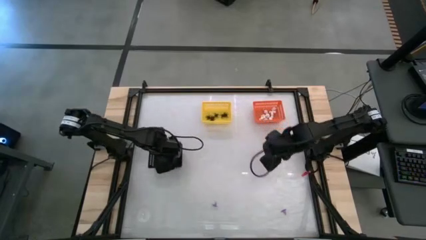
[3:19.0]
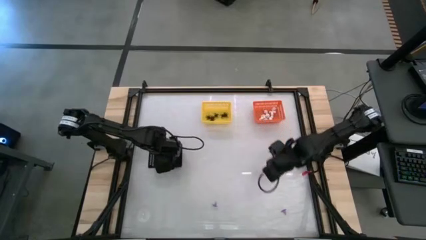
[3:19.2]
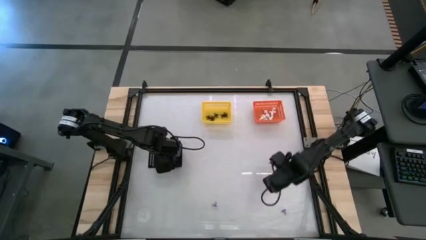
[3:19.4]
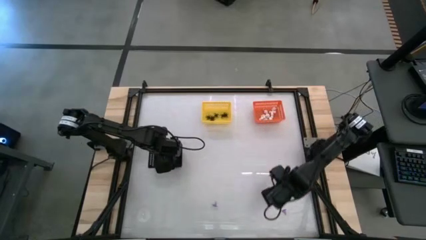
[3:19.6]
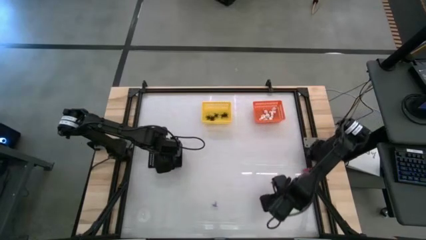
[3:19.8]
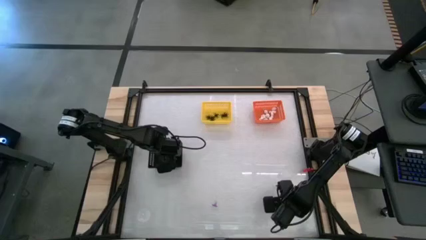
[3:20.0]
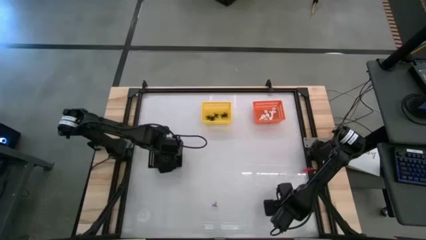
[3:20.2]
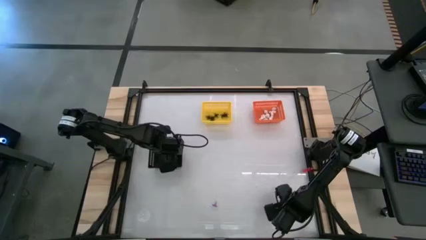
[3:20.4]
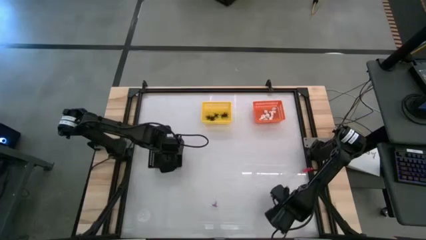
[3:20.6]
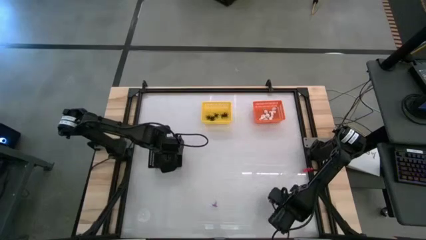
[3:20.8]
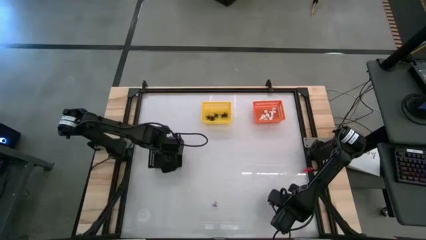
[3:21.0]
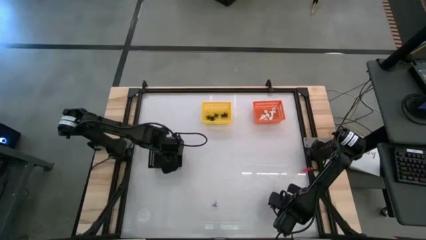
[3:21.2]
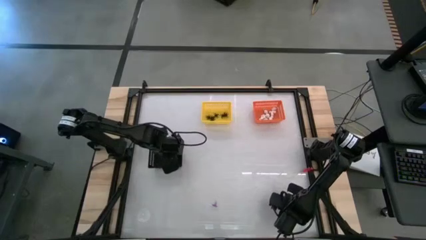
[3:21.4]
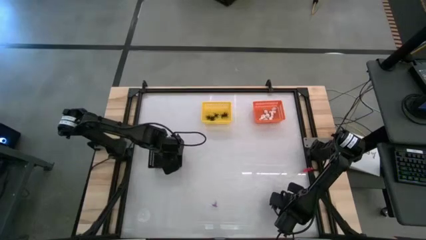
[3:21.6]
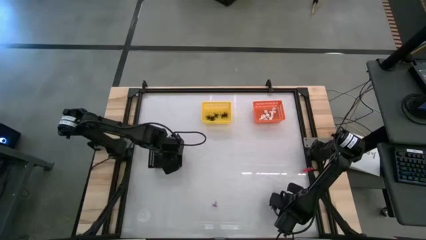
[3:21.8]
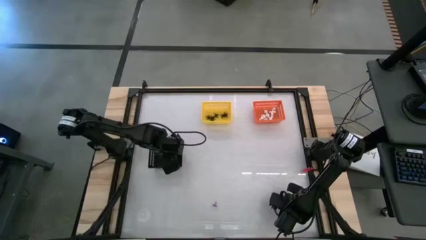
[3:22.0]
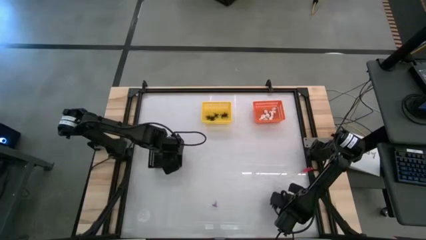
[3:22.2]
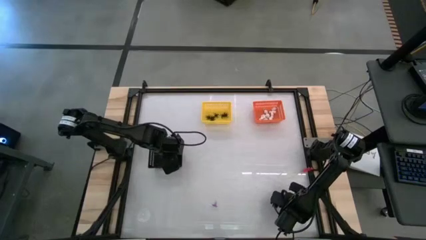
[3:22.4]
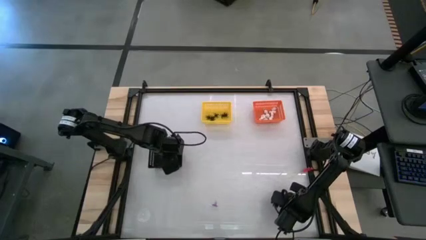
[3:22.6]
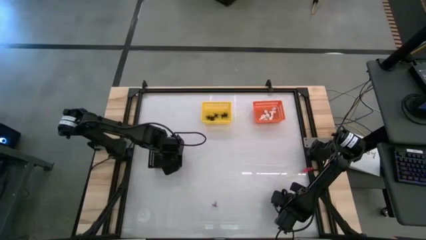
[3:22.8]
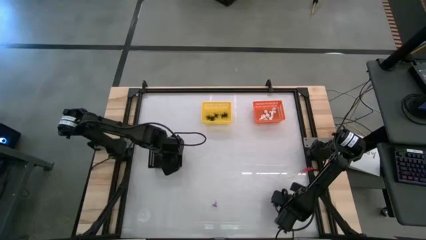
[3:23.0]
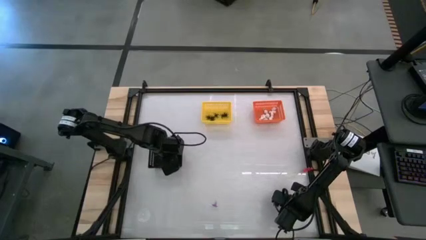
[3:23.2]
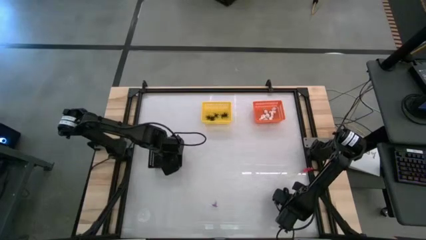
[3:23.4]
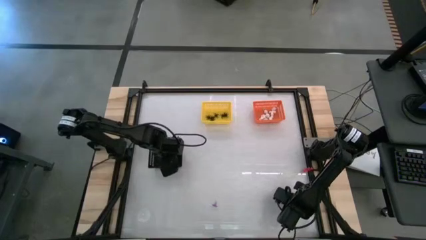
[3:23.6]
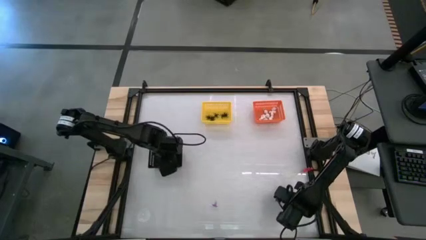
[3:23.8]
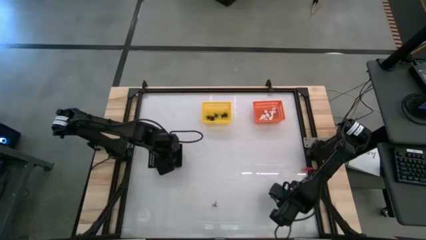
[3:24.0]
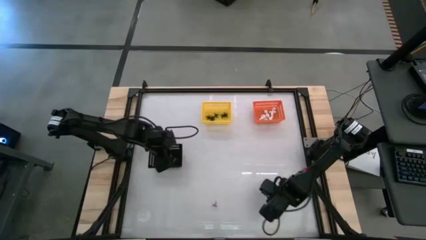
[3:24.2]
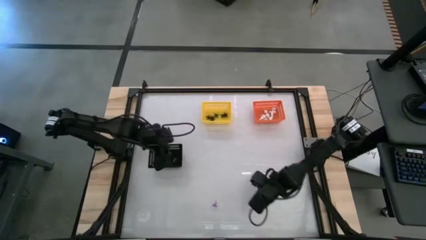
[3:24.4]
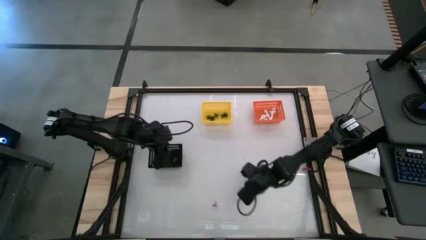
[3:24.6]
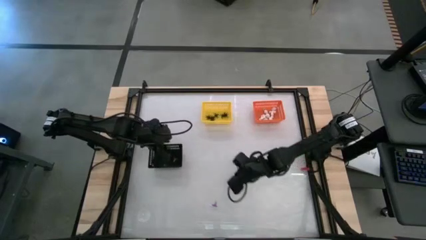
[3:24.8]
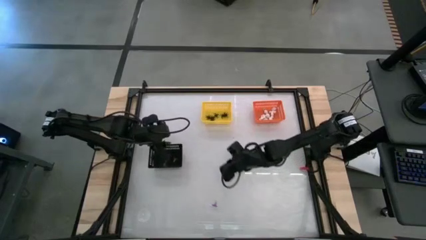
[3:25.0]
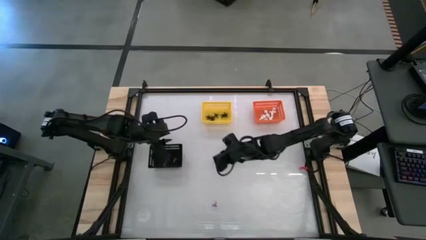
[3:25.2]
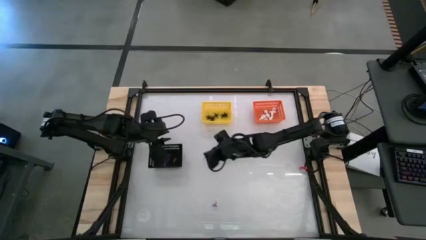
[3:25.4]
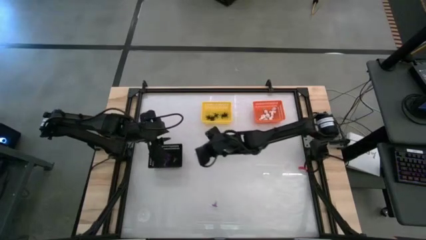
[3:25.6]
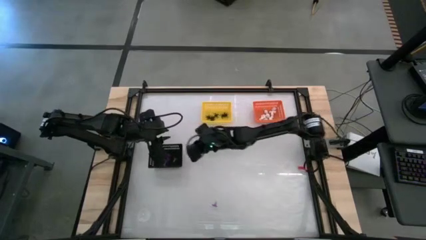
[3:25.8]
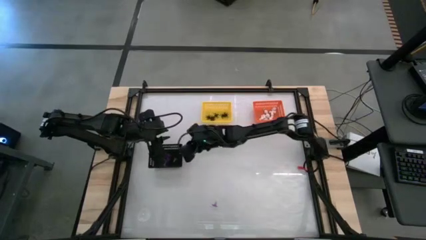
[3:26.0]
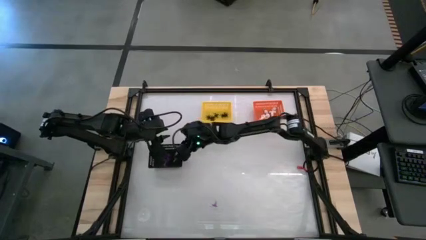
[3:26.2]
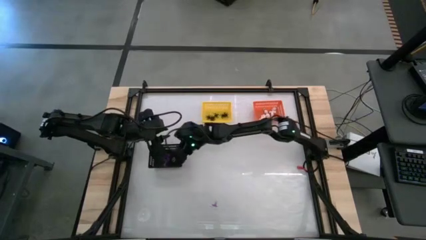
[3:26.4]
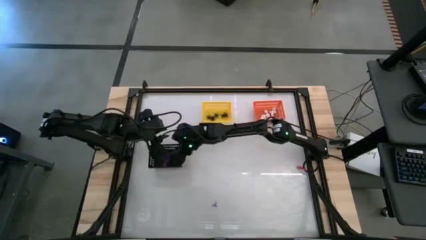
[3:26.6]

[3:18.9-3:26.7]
Task: Sort Halloween decoration
Put the purple hat toy into the black basket

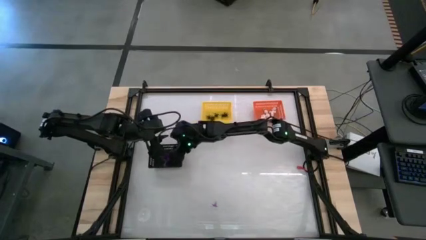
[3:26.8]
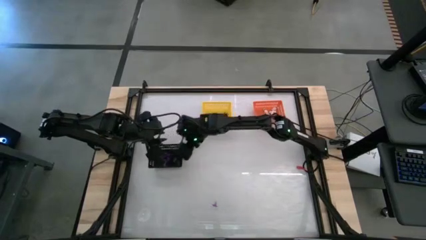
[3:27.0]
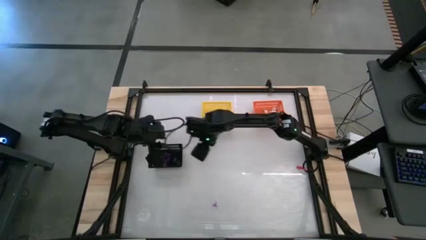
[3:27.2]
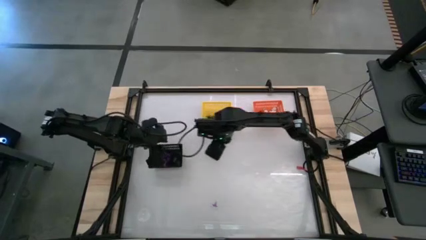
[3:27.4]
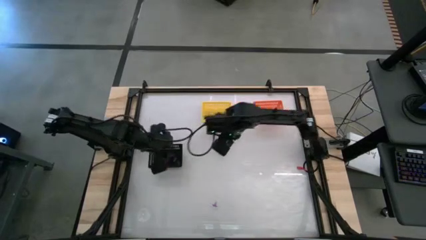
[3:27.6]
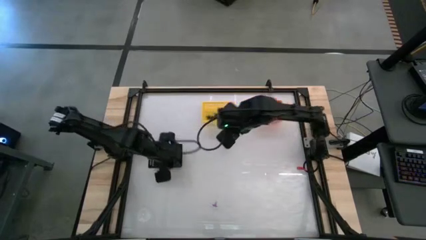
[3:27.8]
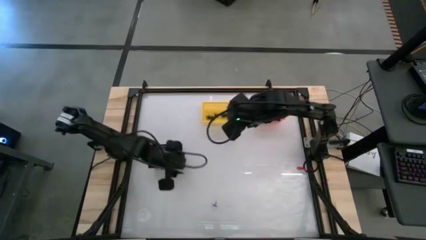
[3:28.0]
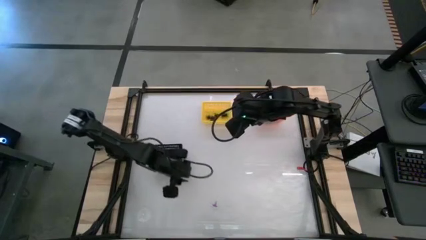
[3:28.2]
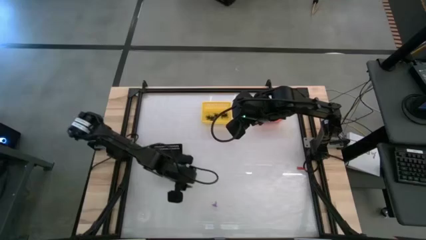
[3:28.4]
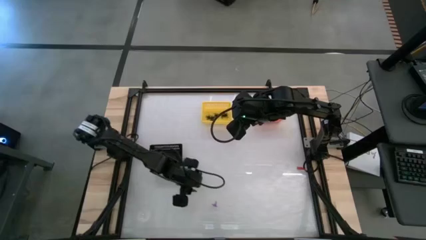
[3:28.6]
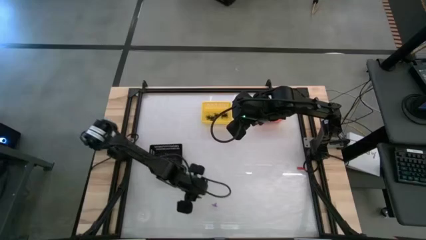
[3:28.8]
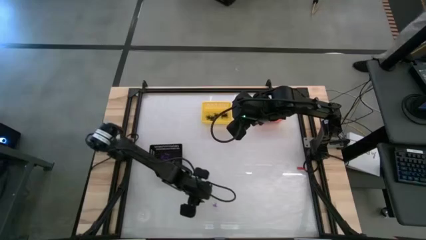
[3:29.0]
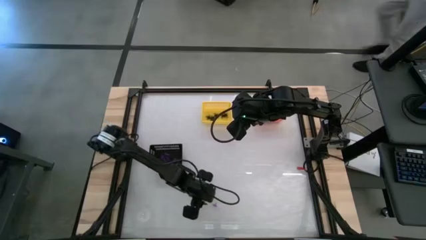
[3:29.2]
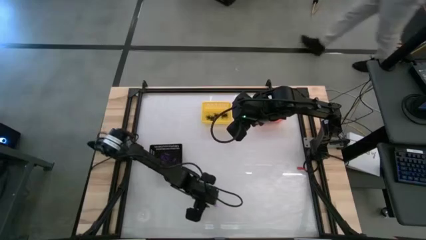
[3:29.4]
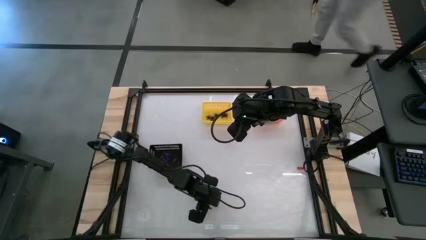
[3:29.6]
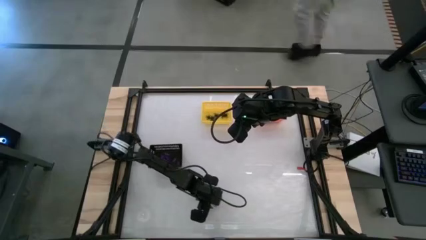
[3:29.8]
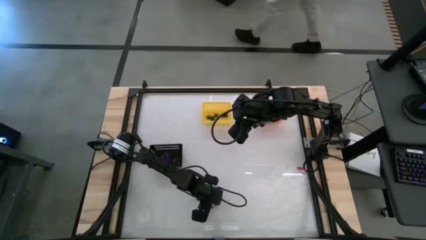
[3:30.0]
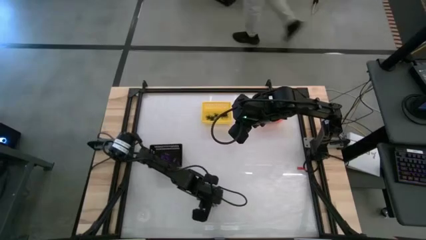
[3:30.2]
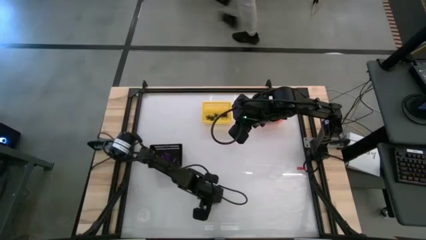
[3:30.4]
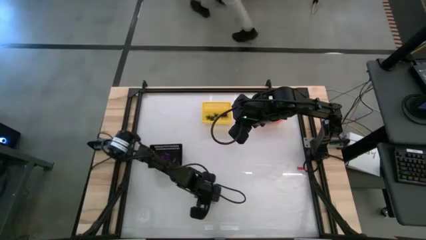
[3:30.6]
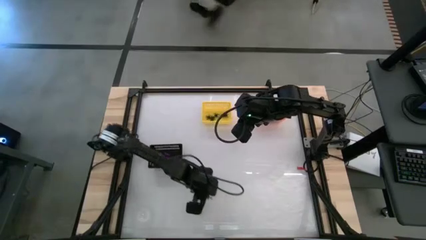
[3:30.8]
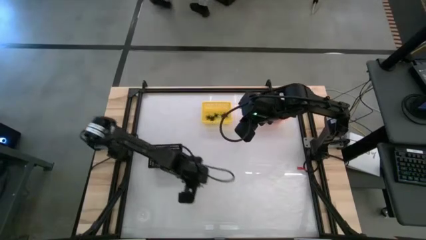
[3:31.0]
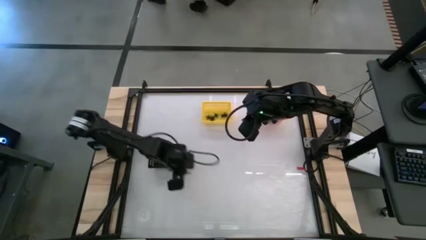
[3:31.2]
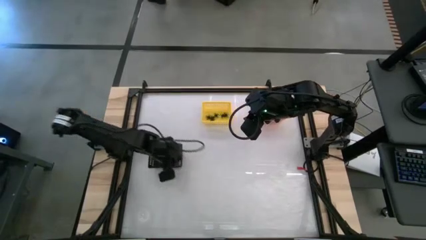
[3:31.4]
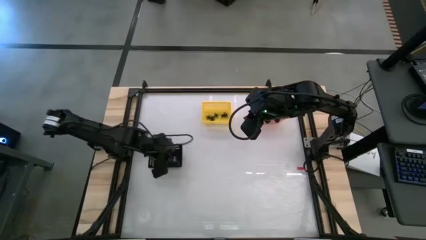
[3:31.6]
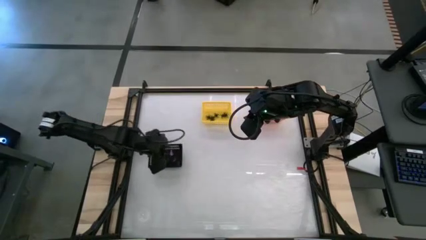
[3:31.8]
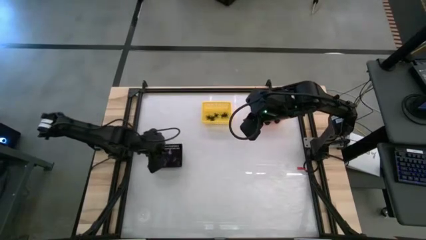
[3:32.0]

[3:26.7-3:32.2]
Put the purple hat toy into the black basket
